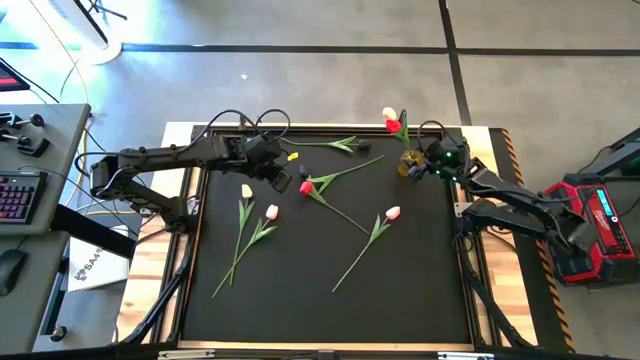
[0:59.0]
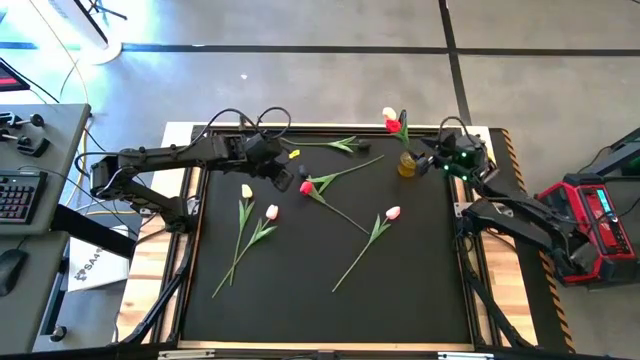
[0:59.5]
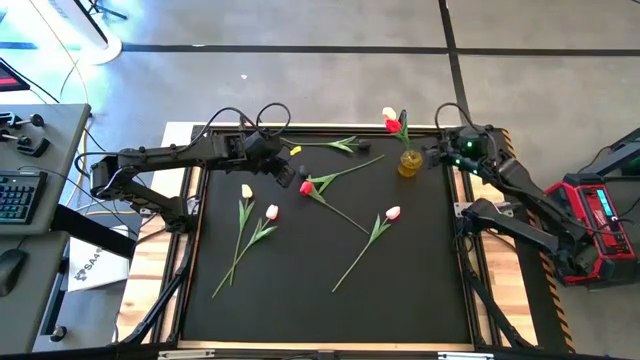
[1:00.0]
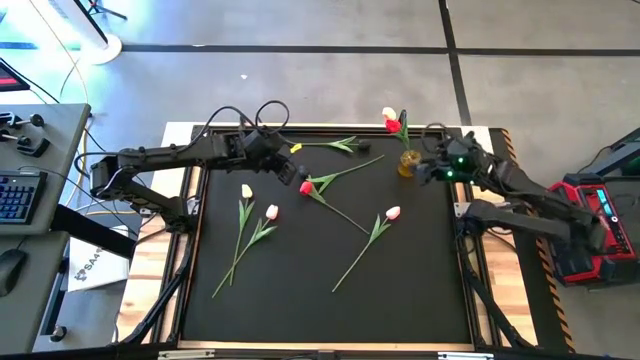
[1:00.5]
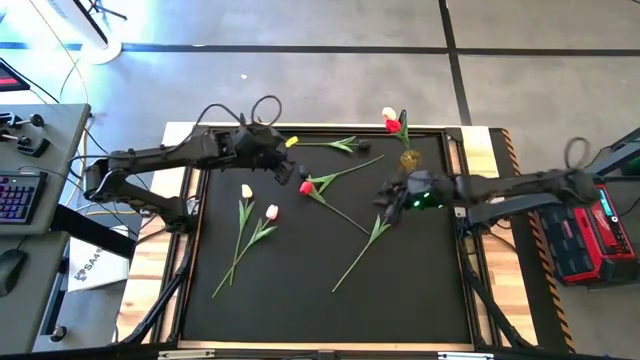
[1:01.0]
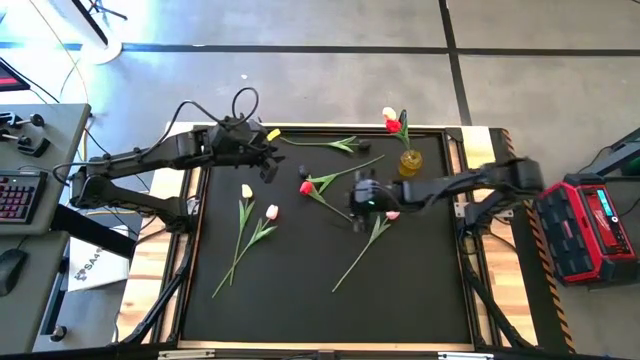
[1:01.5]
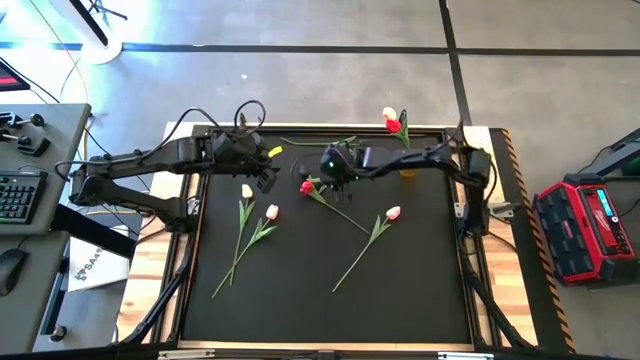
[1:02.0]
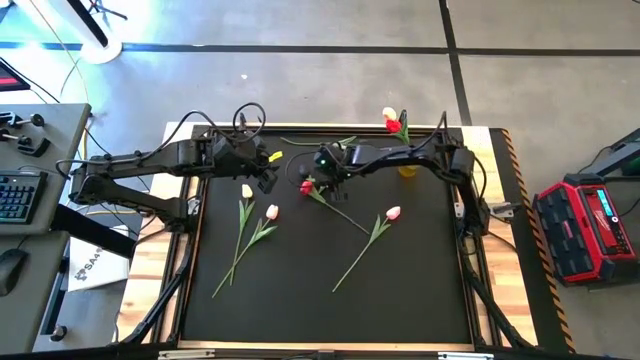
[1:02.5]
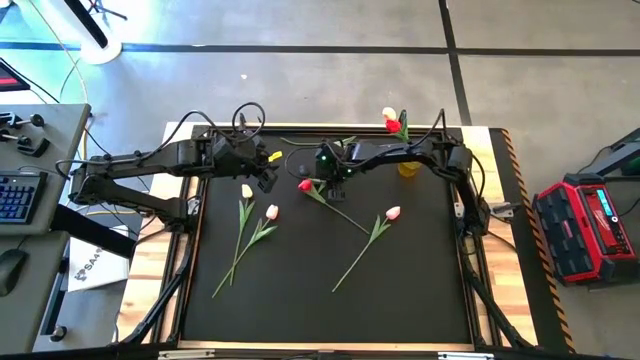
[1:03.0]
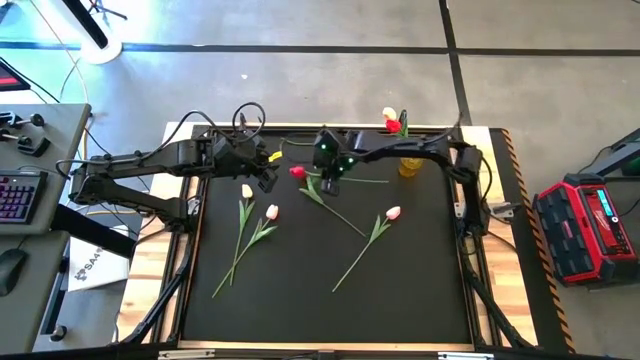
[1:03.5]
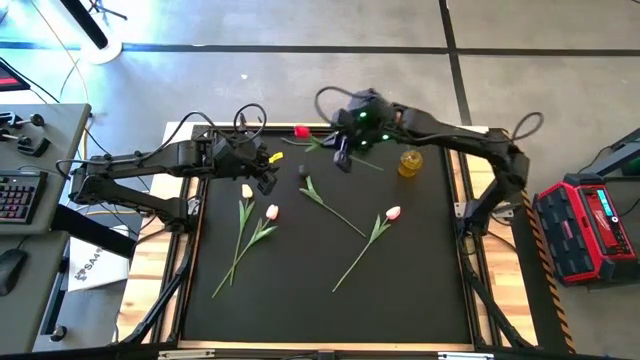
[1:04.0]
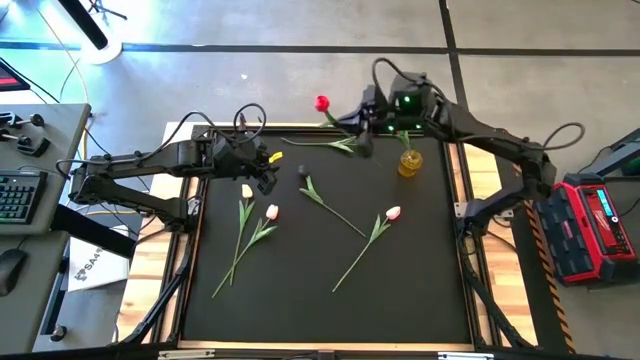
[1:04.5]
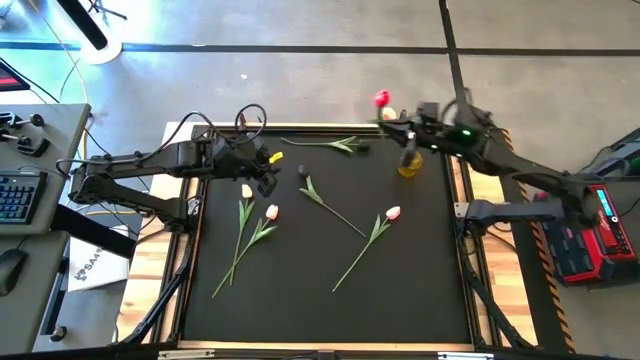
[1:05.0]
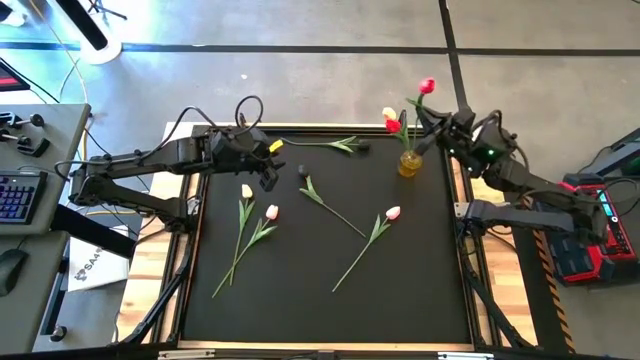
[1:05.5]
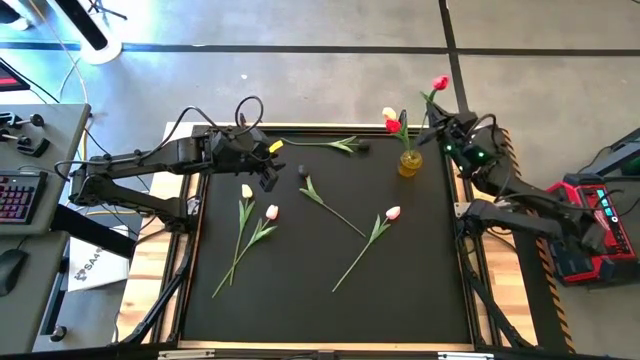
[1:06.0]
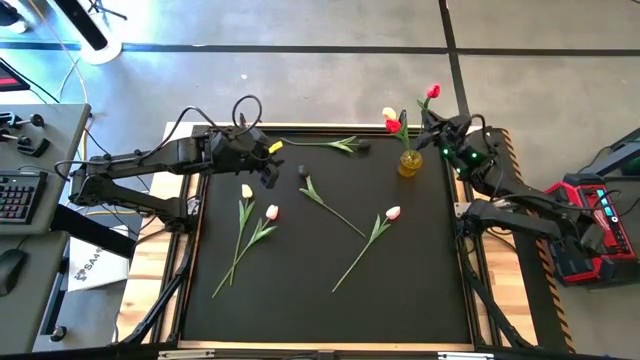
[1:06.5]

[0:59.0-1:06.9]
Task: Sort flowers into vase by color
Put the red flower into the yellow flower vase

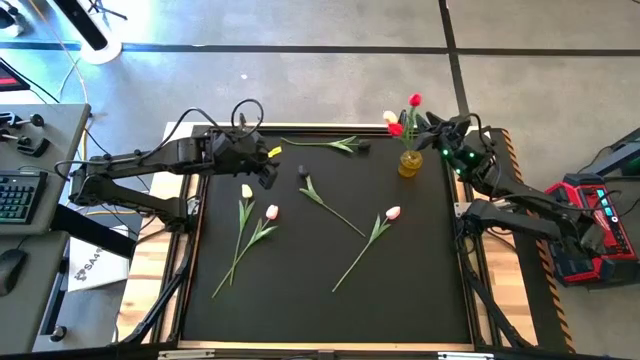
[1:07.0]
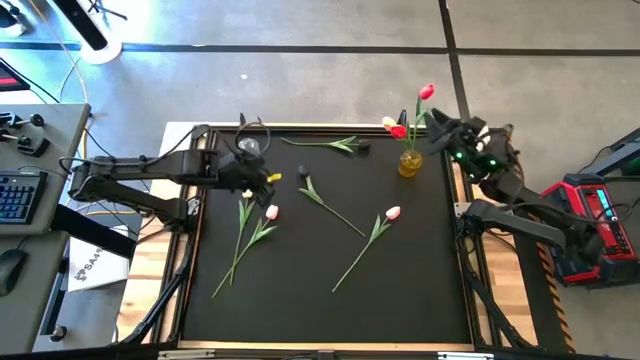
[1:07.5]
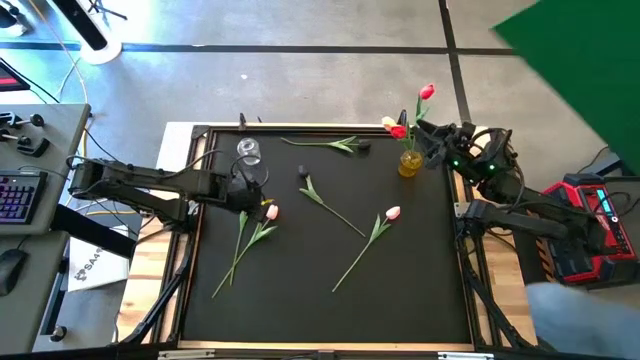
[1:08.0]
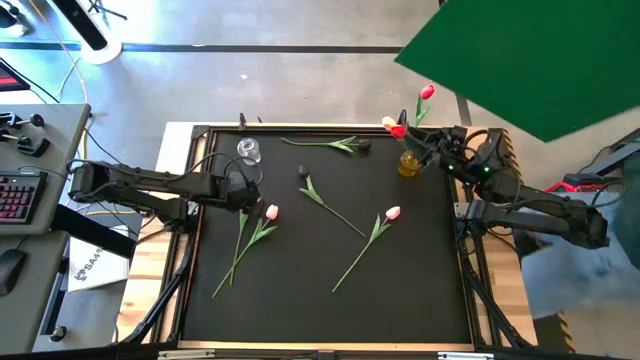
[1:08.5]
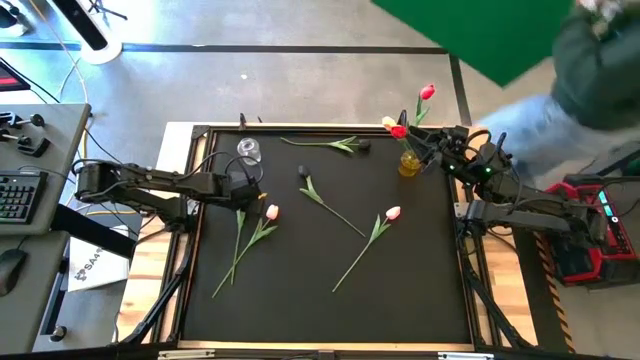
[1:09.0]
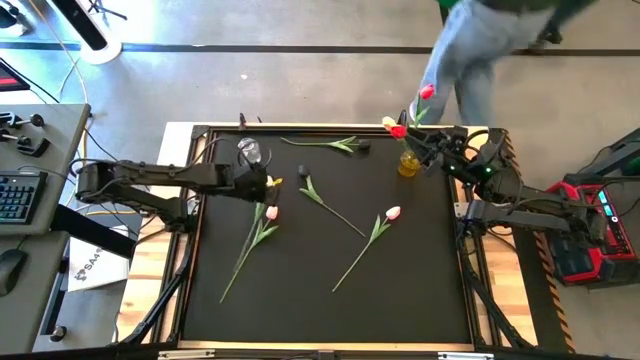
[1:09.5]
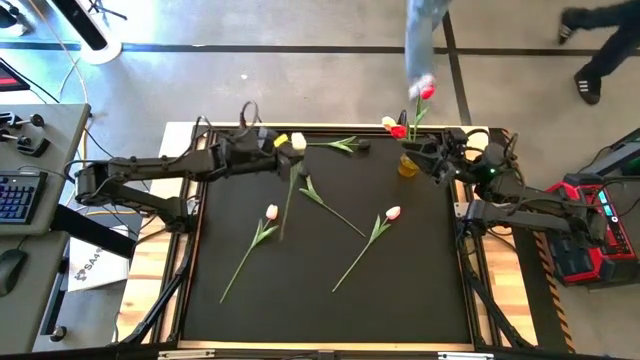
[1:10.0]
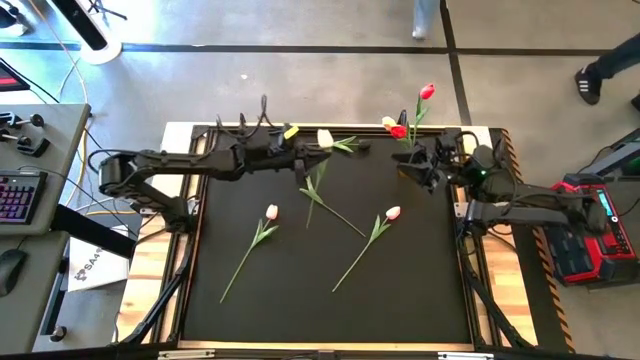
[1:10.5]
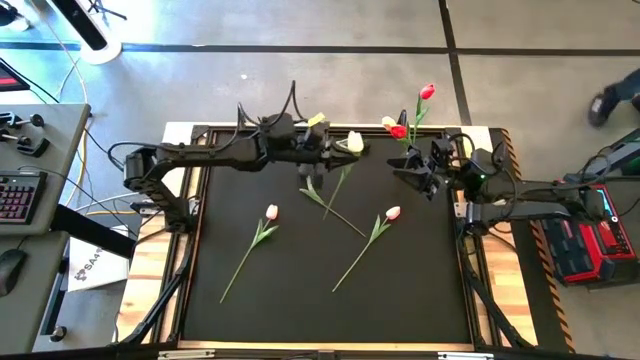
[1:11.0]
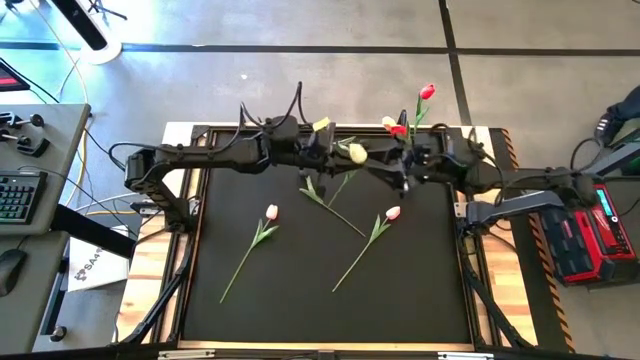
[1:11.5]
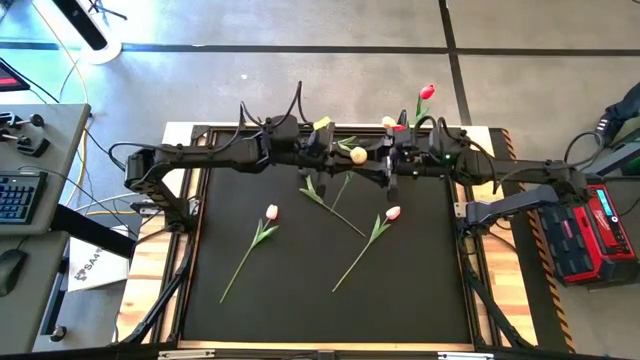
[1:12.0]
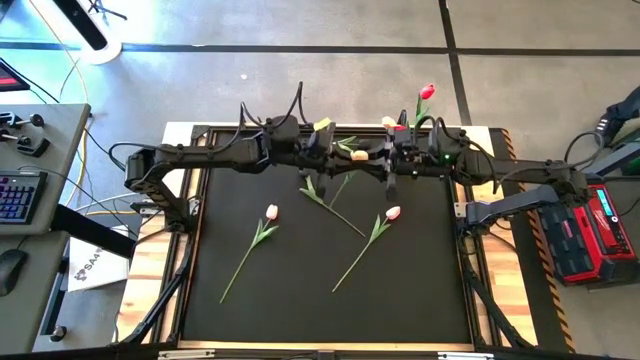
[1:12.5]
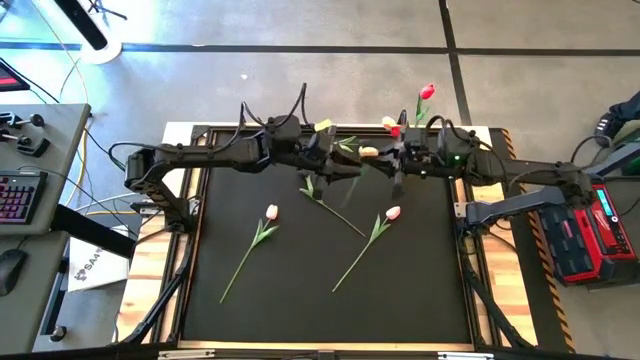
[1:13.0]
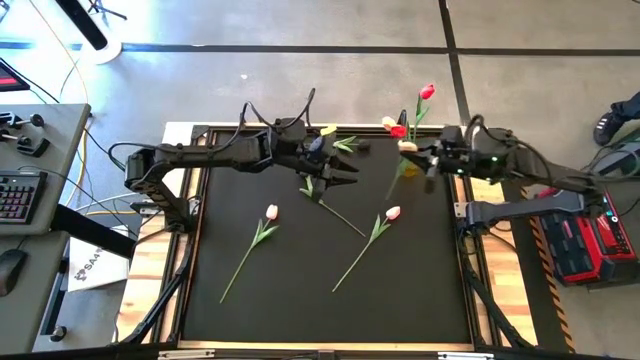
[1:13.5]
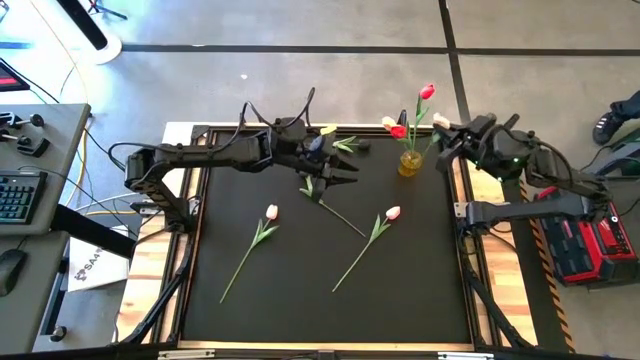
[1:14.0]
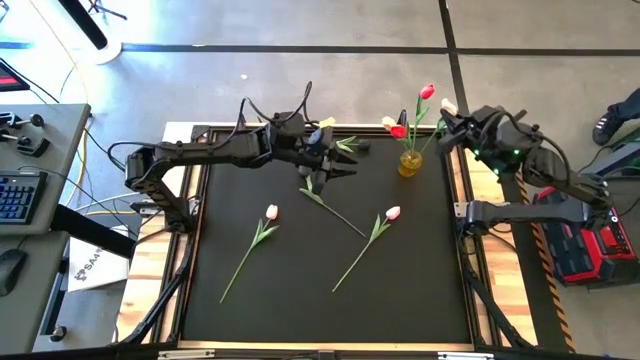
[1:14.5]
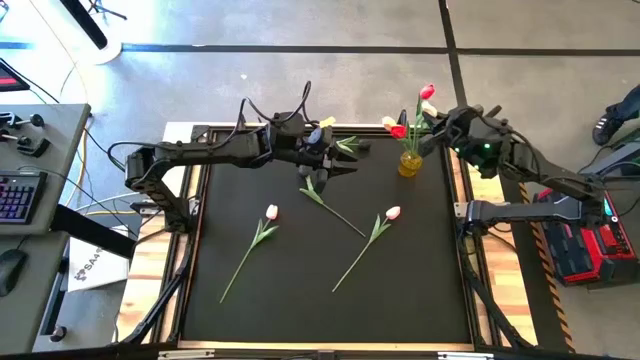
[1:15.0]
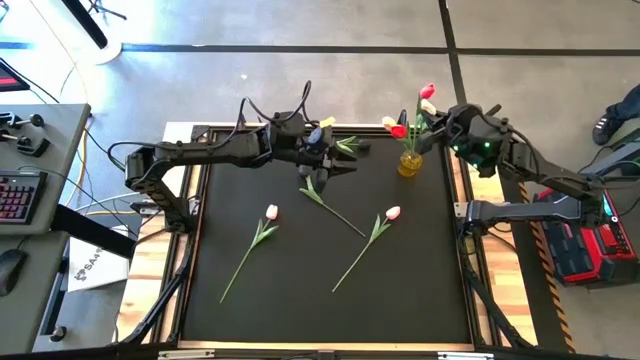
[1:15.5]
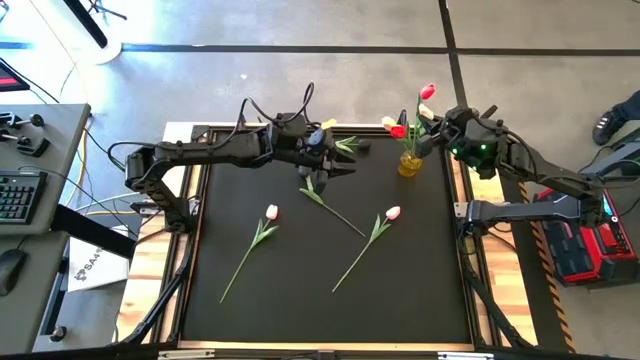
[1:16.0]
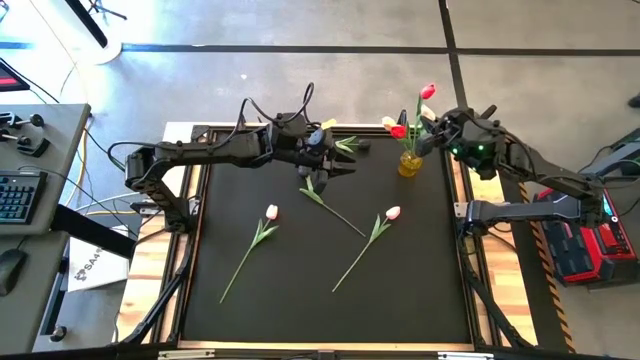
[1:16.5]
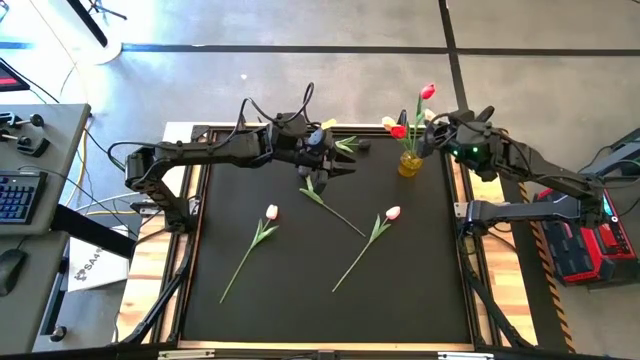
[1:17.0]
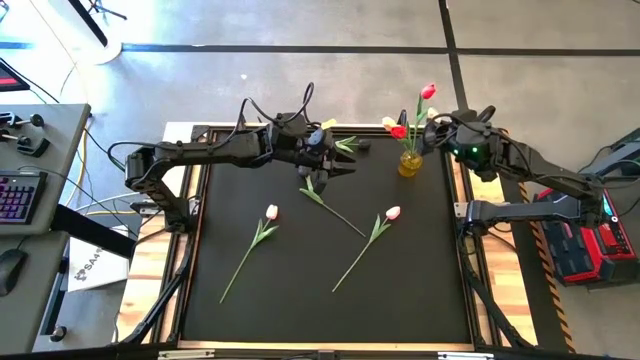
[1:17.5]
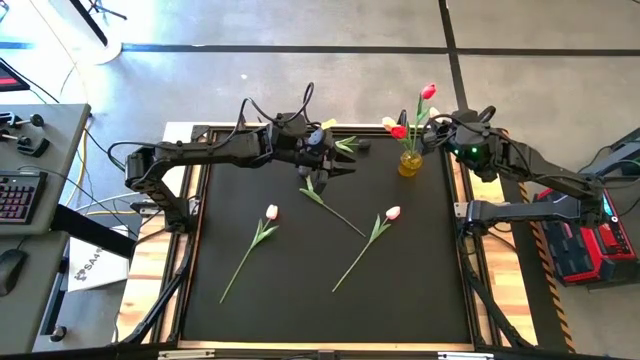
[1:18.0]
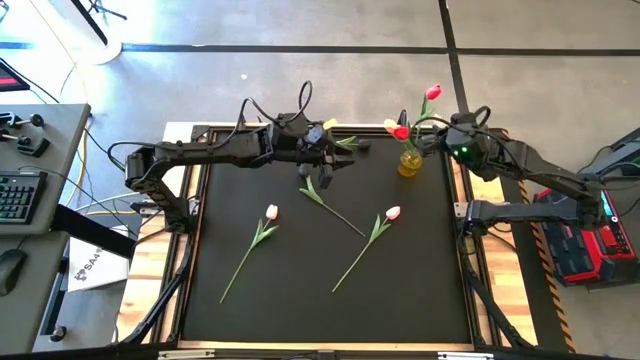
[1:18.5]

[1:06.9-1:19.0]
Put the orange flower into the yellow flower vase
